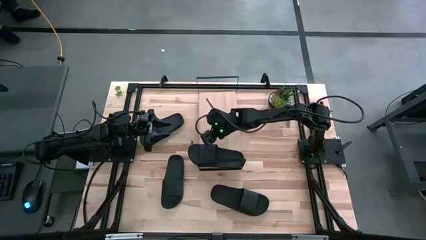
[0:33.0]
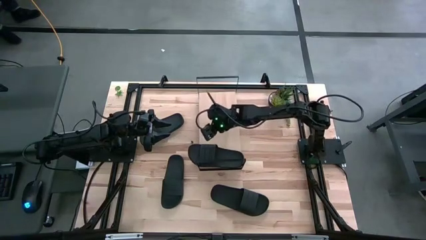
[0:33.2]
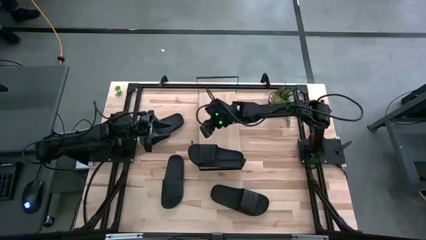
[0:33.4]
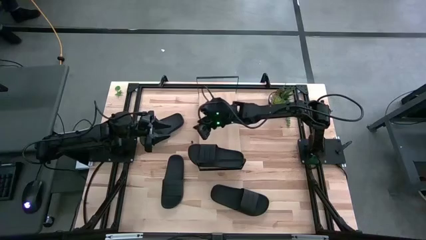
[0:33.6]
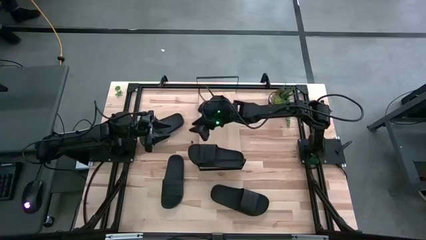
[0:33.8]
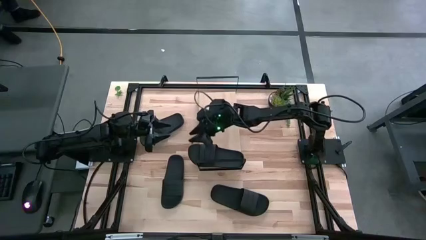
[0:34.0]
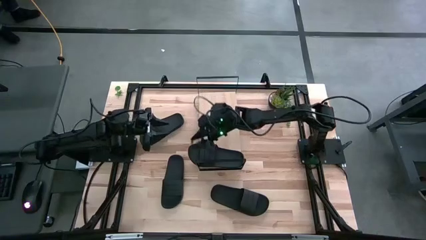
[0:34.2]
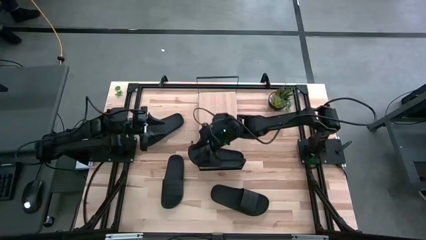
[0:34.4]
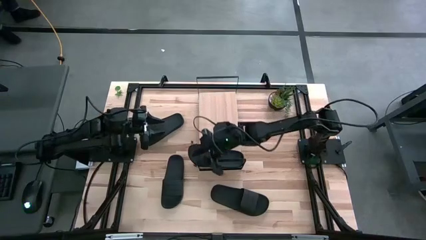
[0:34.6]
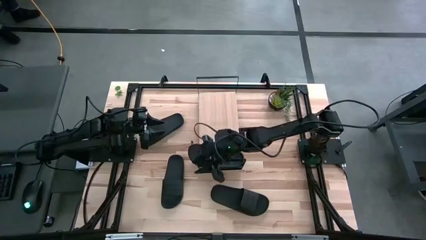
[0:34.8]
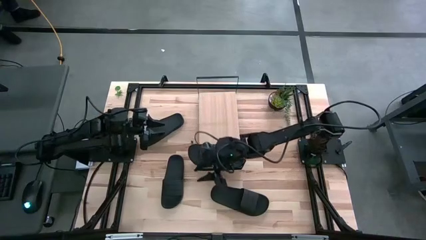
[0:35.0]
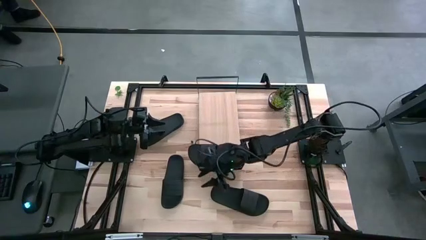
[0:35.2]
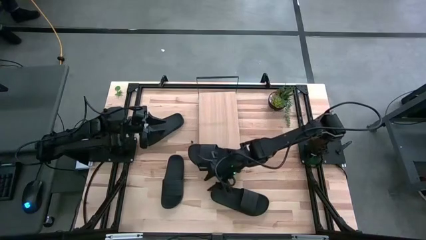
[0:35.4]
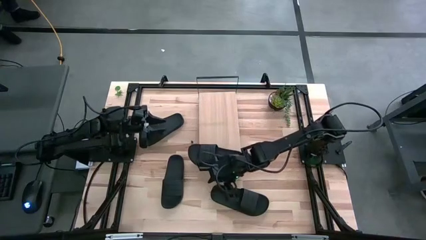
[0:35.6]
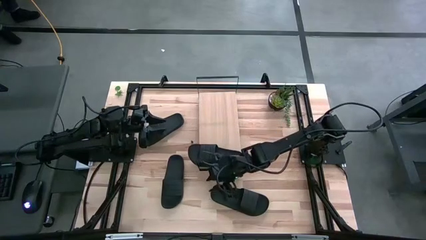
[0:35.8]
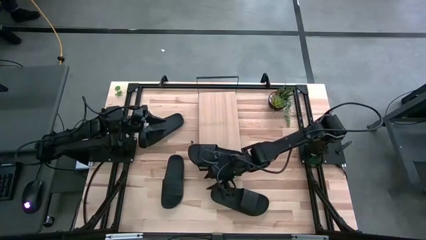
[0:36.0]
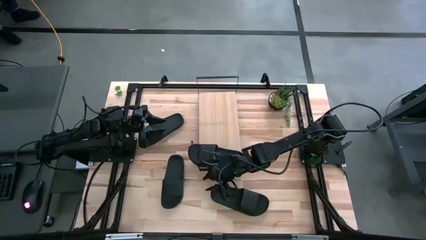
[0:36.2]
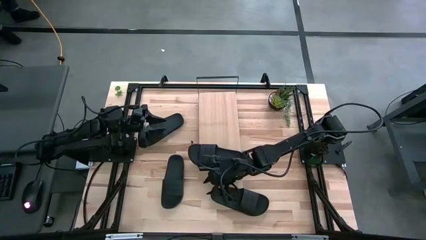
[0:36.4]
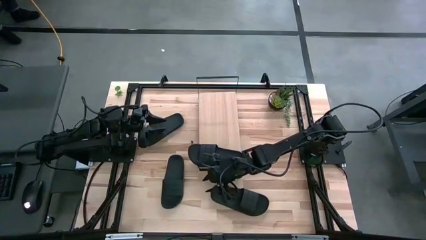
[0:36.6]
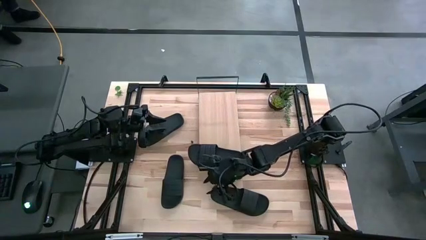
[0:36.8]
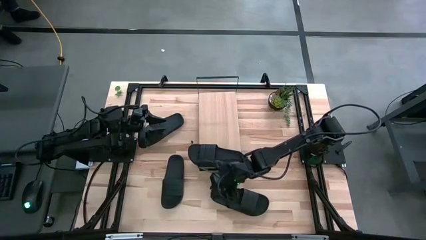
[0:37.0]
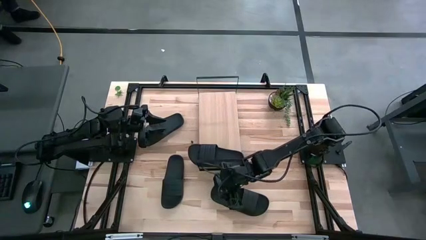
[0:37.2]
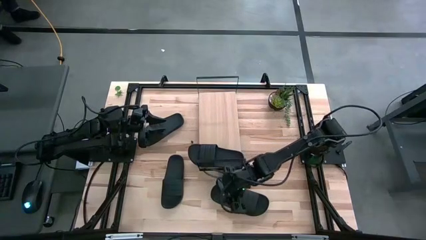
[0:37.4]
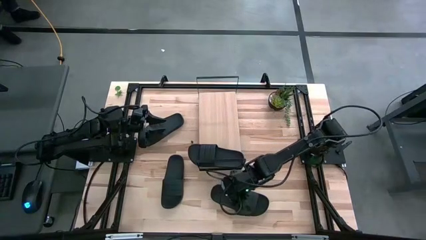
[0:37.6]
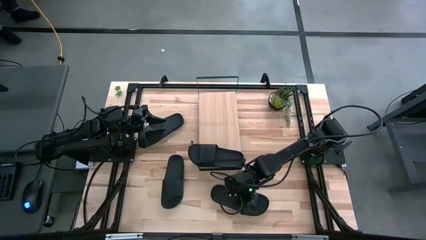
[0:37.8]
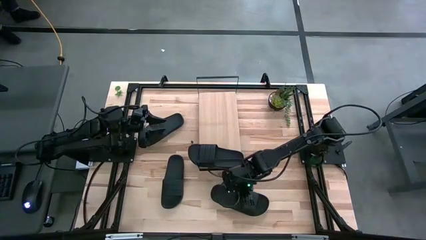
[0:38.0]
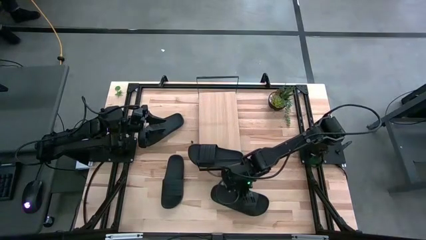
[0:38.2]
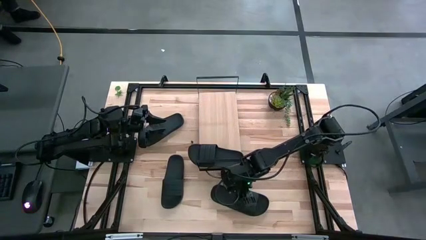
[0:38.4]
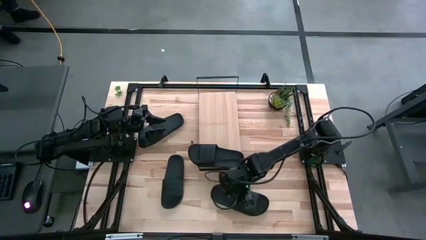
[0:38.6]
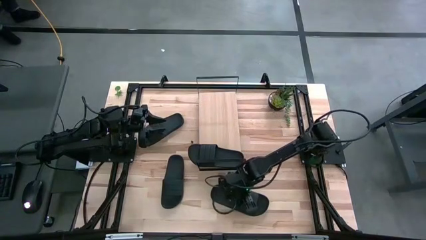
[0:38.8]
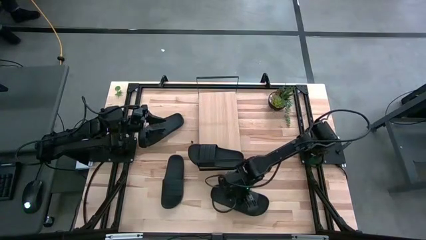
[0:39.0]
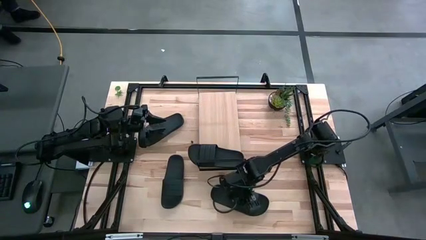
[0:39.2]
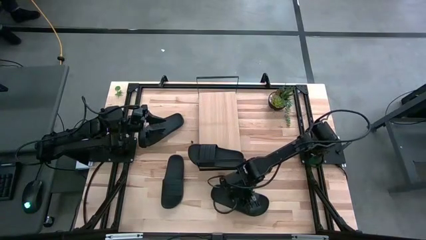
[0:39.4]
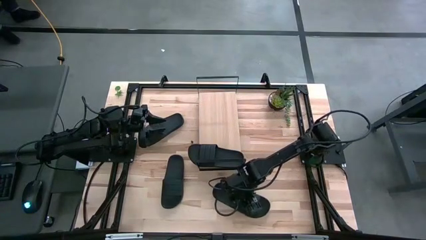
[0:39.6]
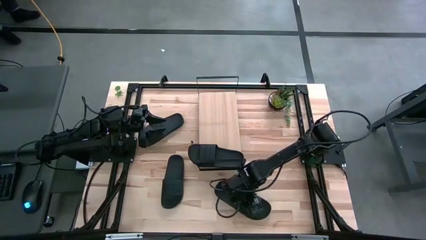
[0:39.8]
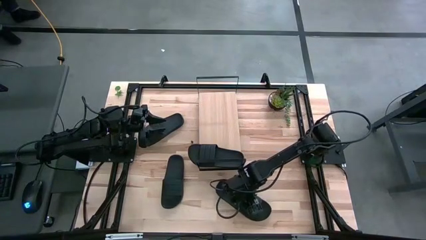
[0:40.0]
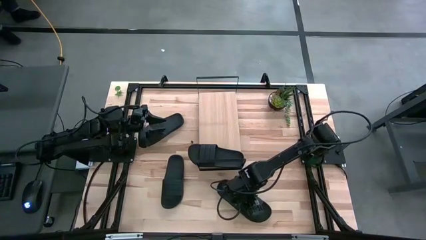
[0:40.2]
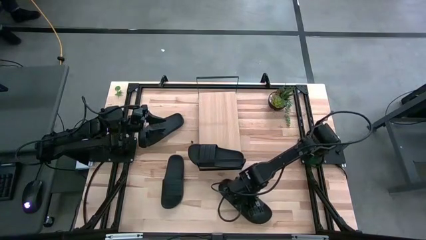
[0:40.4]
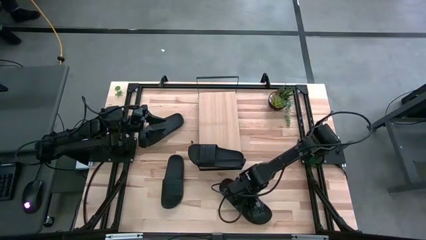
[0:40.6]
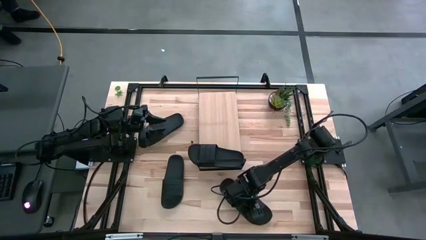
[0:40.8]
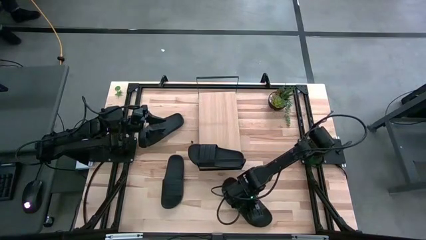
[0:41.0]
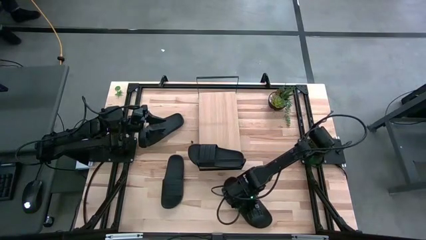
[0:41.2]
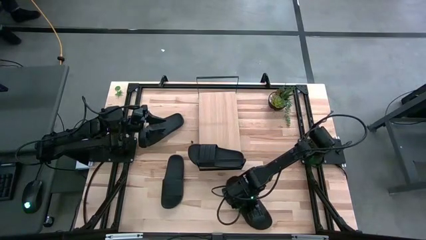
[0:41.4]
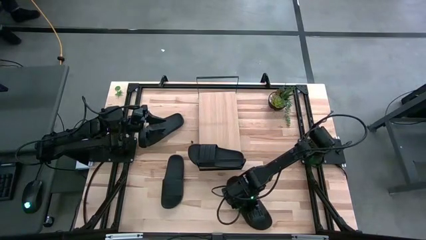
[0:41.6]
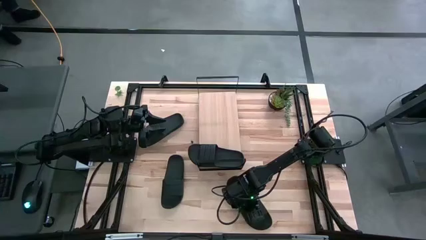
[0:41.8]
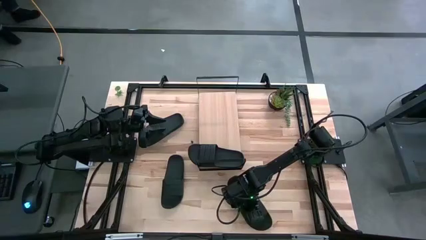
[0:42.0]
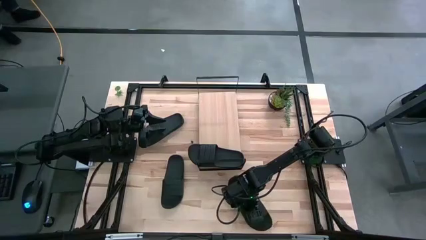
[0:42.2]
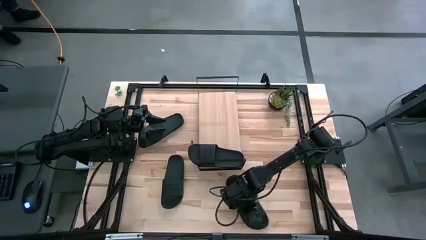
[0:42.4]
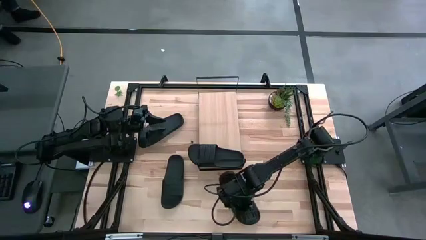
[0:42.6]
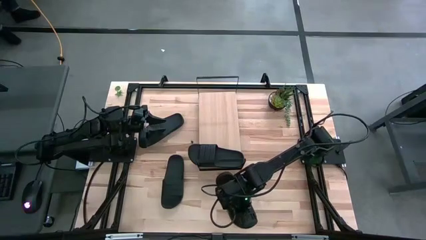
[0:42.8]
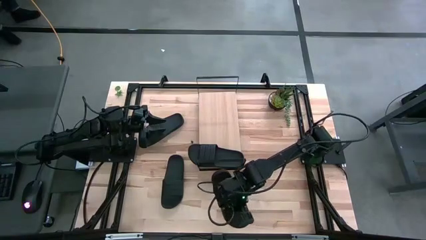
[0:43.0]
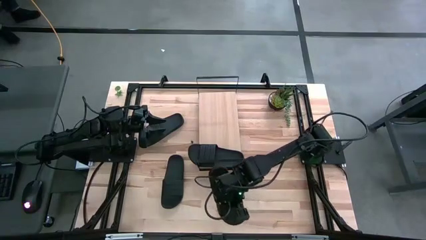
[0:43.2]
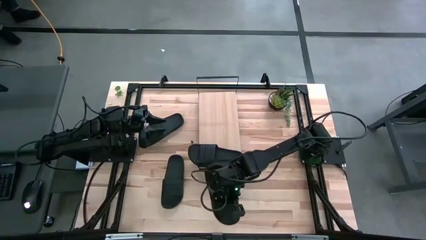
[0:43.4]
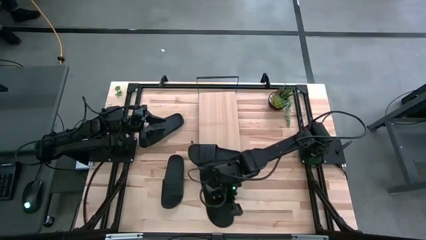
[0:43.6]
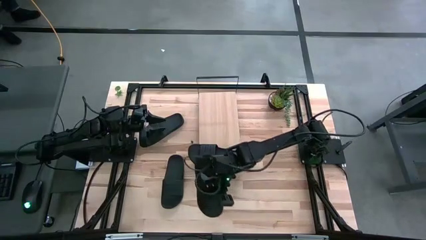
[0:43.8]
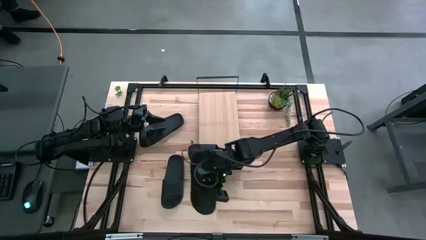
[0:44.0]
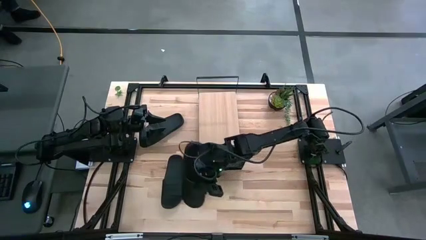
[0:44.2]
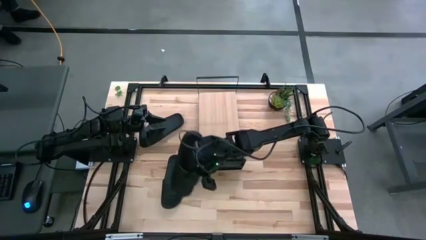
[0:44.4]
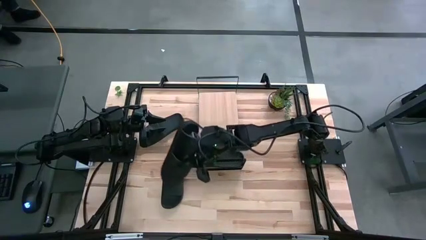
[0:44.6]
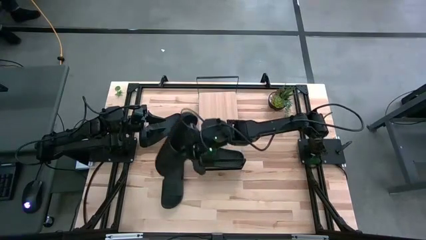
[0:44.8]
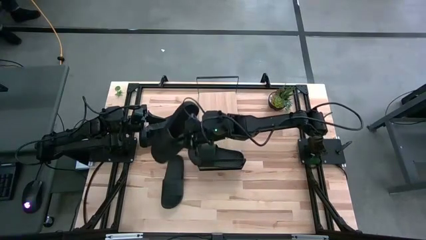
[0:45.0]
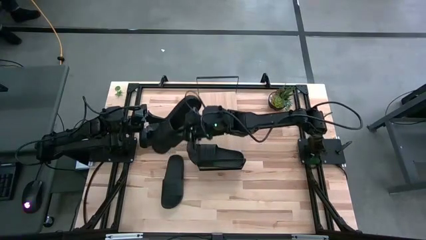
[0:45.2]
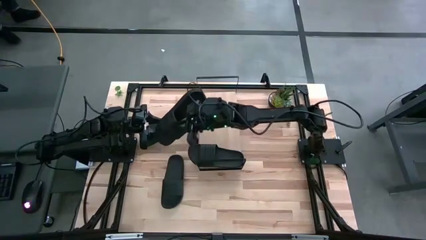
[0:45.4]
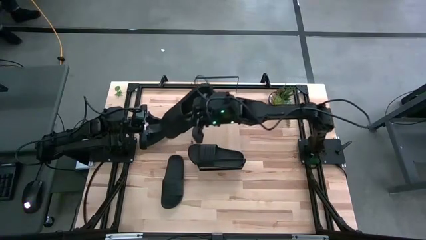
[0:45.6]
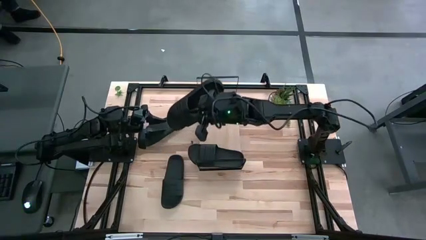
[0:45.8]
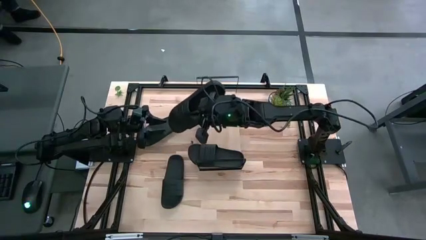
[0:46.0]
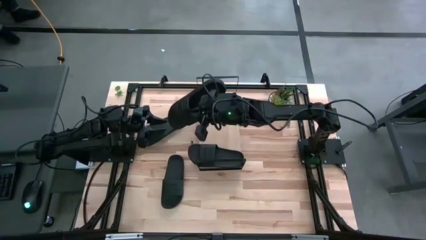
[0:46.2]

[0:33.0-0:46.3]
Task: Pick and place slides into the shelf
Put the bottom right black slipper on the shelf
